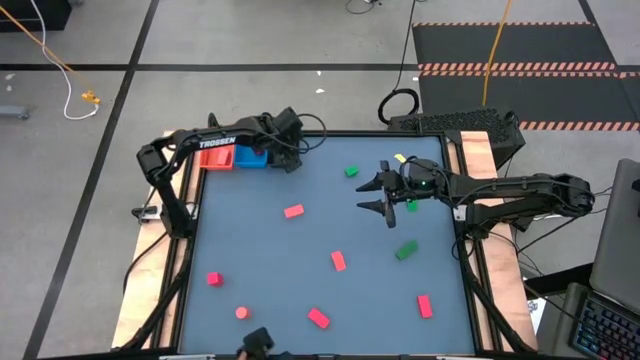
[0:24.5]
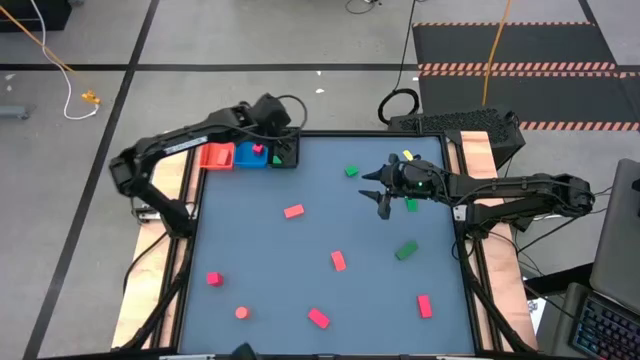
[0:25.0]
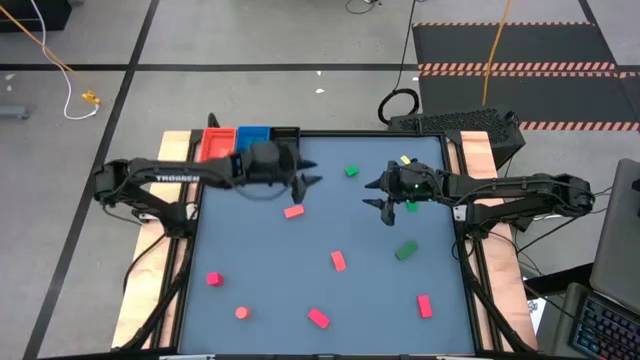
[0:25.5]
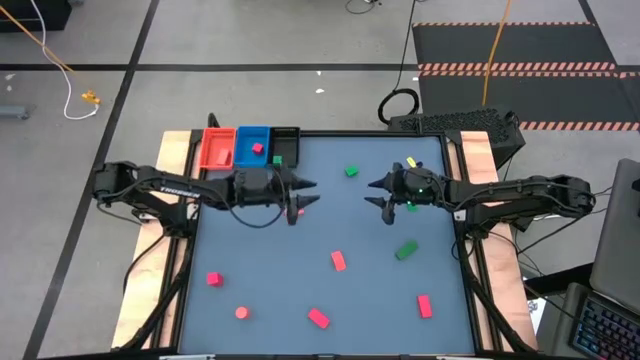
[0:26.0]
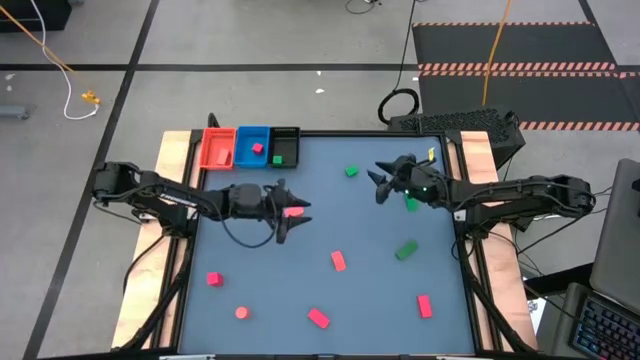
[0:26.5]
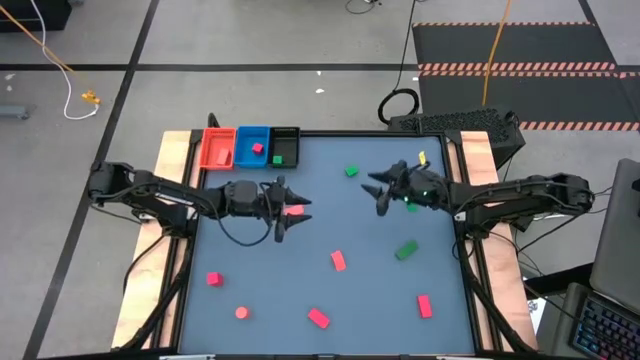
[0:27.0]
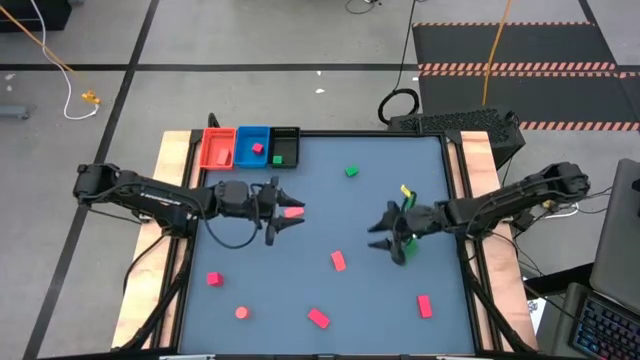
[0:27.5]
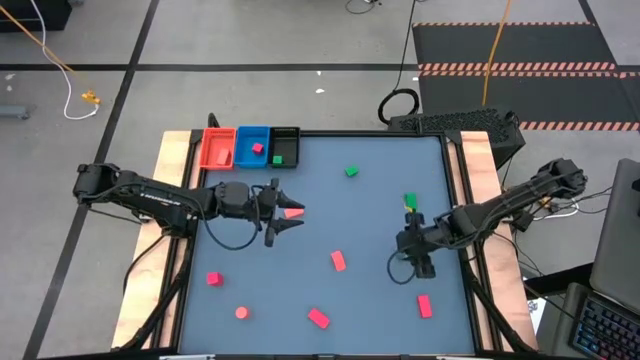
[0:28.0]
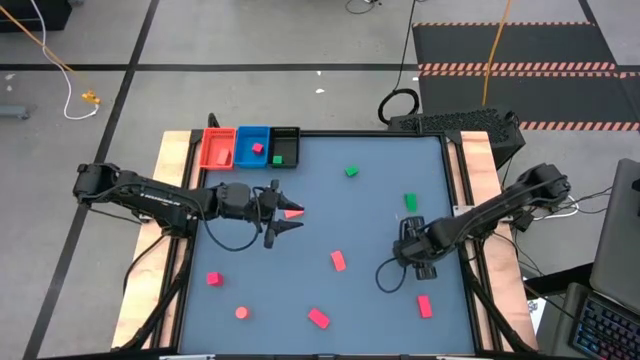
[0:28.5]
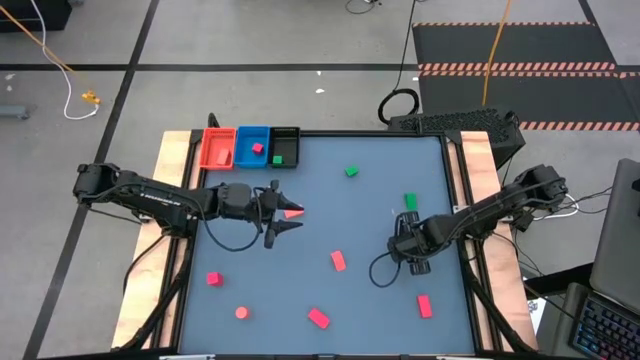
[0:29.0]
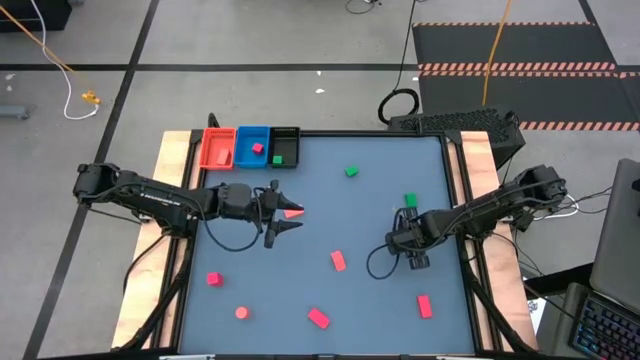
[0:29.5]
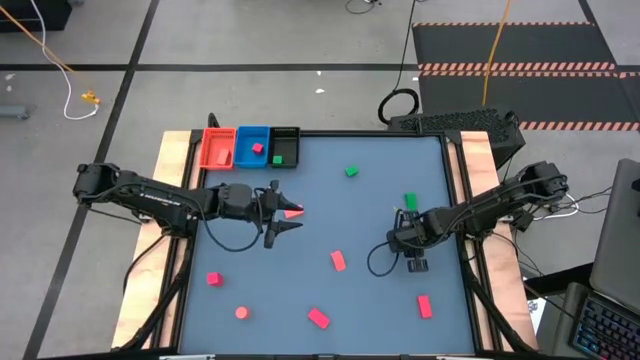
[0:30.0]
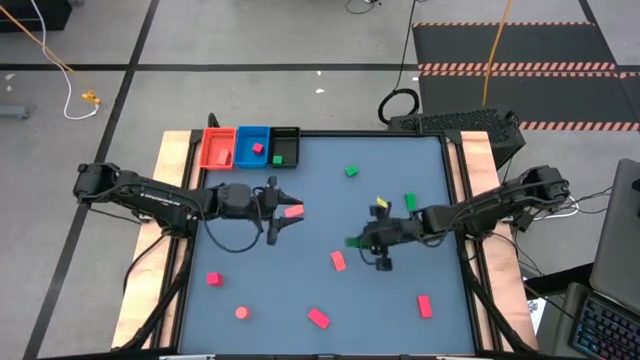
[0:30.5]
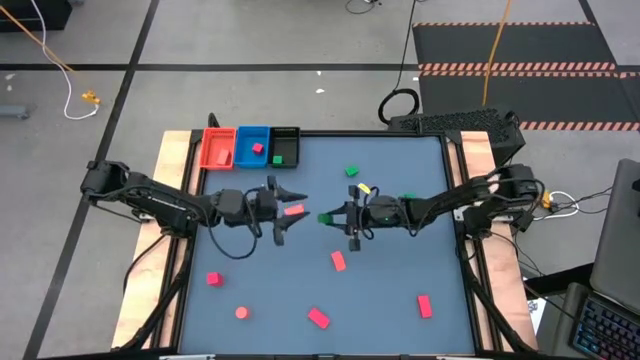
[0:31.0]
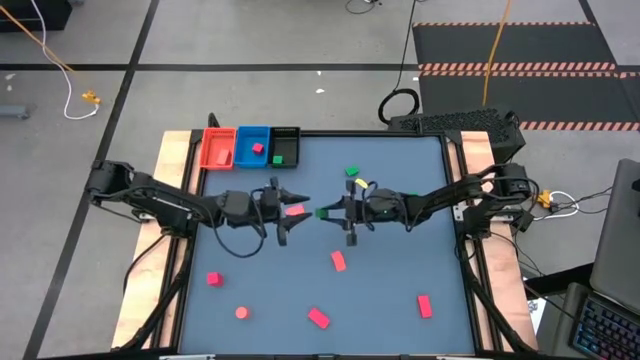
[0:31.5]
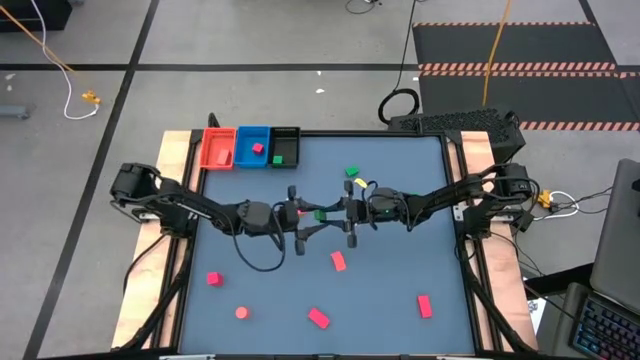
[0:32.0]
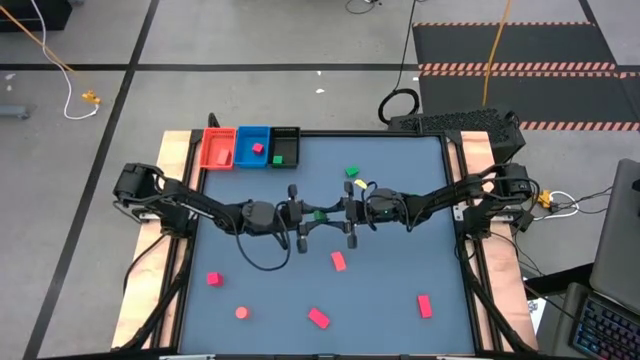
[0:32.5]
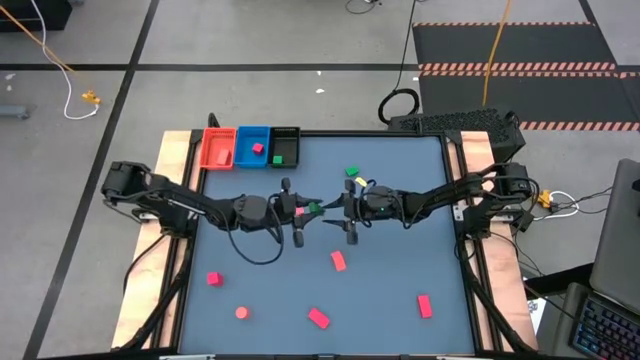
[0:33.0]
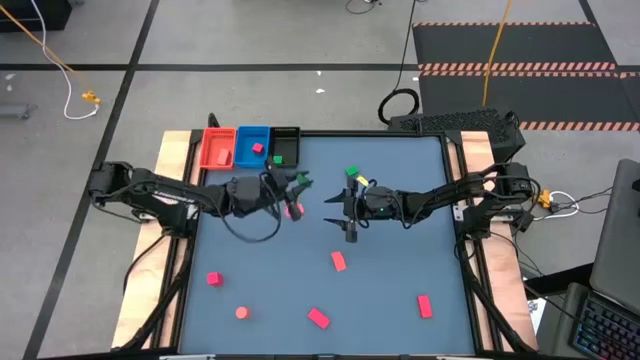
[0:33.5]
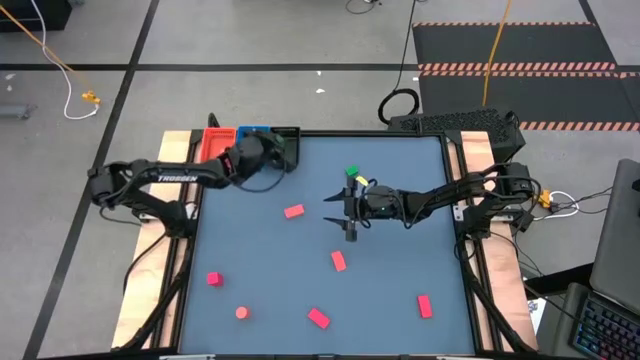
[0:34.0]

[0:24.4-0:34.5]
Task: Sort & place blocks by color
Put the green block into the black bin

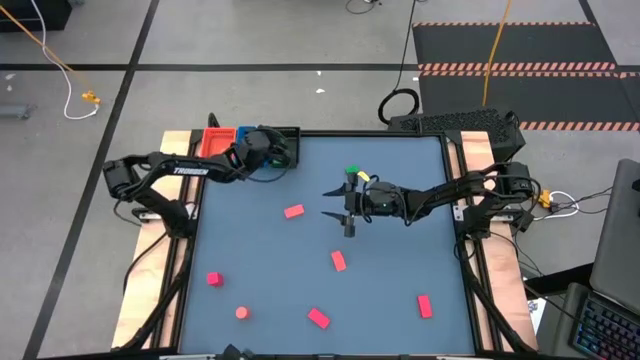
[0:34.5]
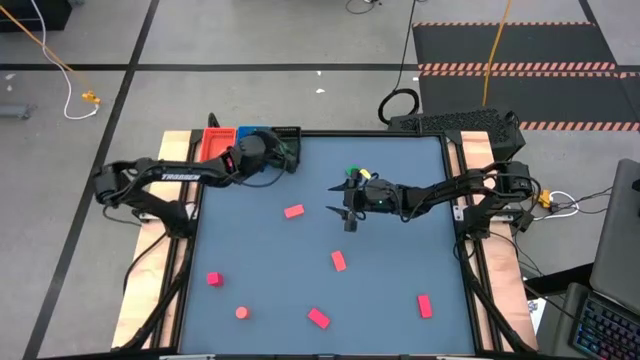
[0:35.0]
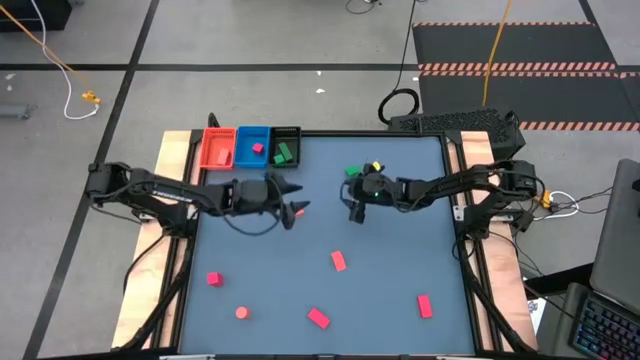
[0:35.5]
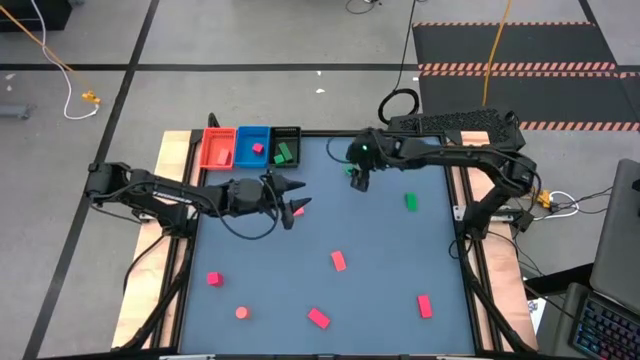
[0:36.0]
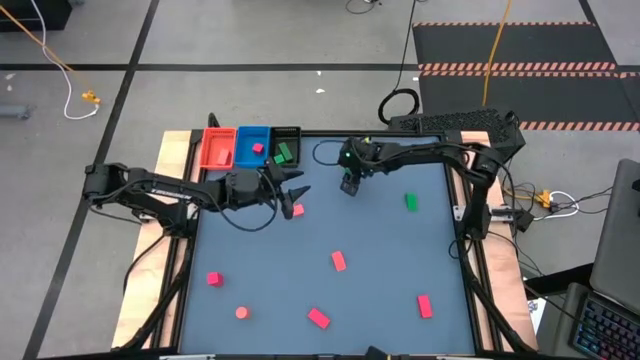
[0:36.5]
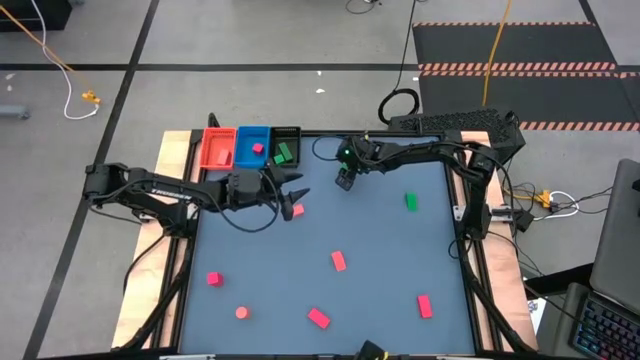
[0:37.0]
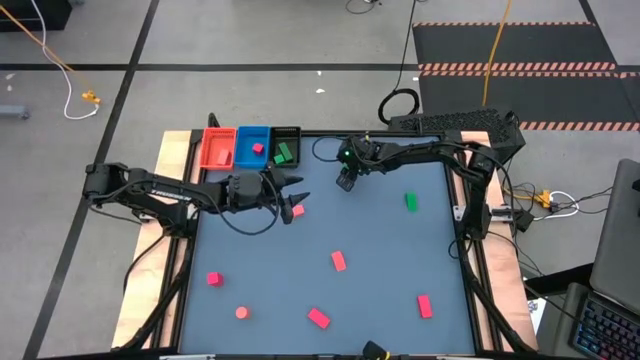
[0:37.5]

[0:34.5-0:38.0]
Put the green block into the black bin

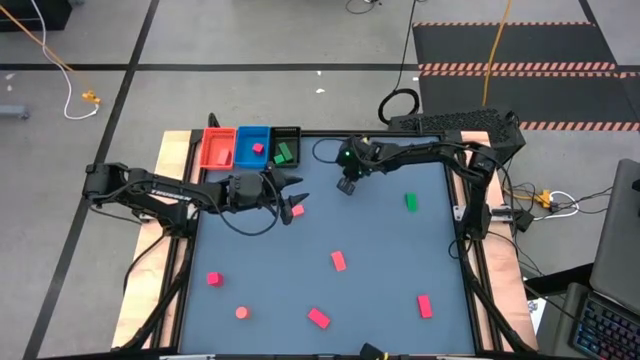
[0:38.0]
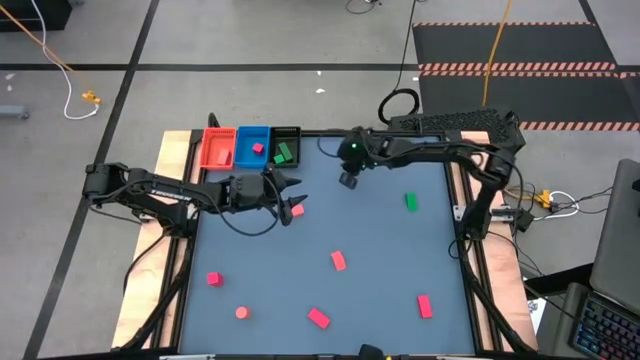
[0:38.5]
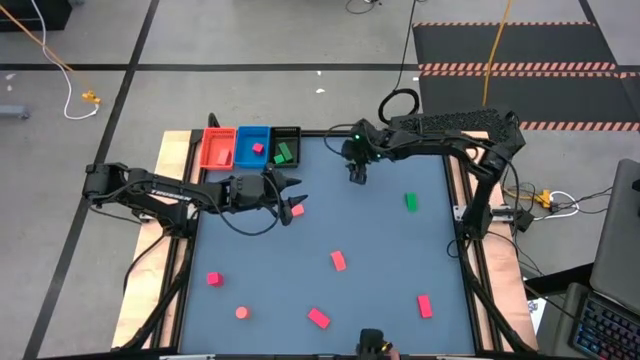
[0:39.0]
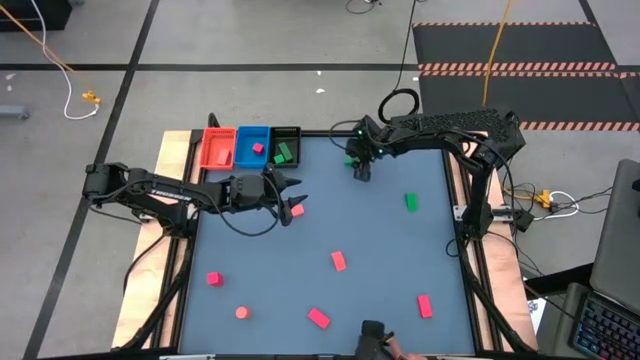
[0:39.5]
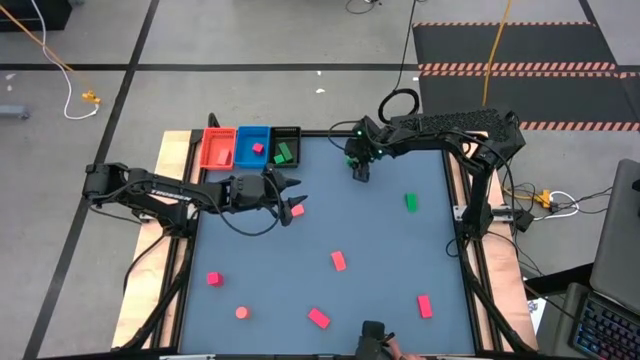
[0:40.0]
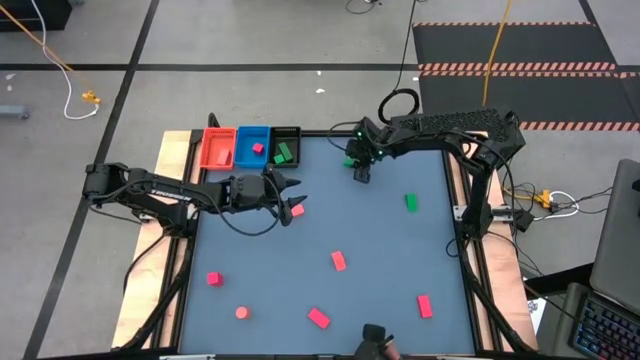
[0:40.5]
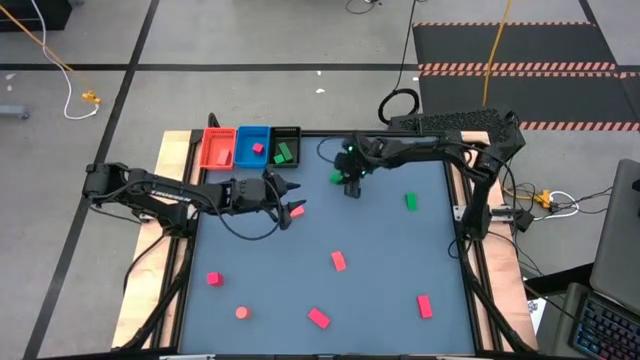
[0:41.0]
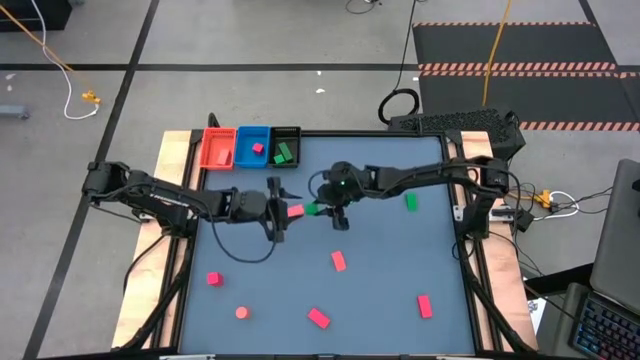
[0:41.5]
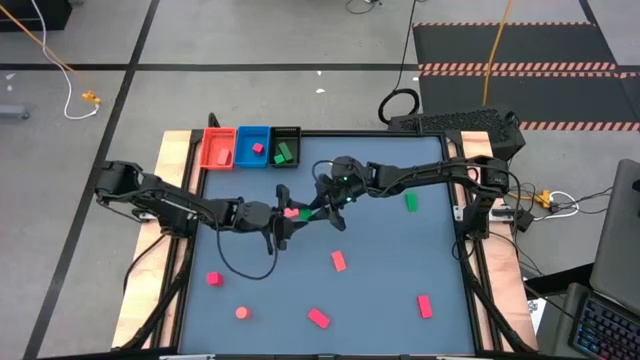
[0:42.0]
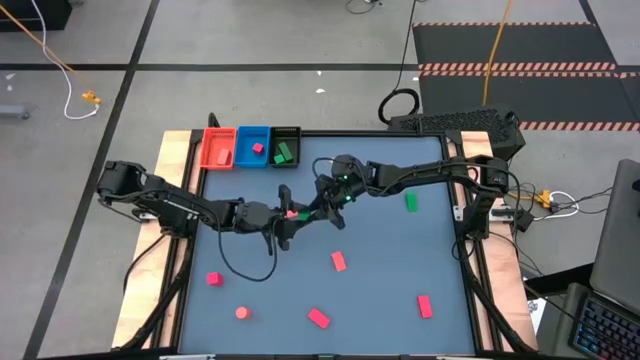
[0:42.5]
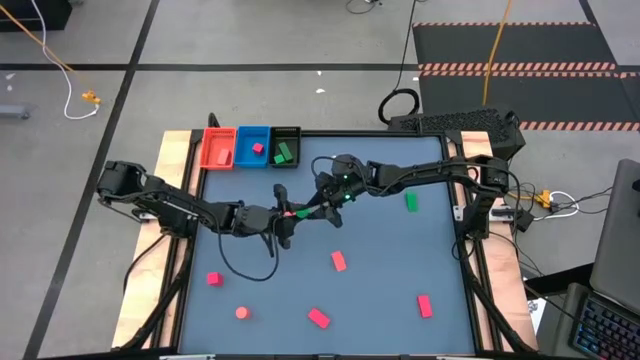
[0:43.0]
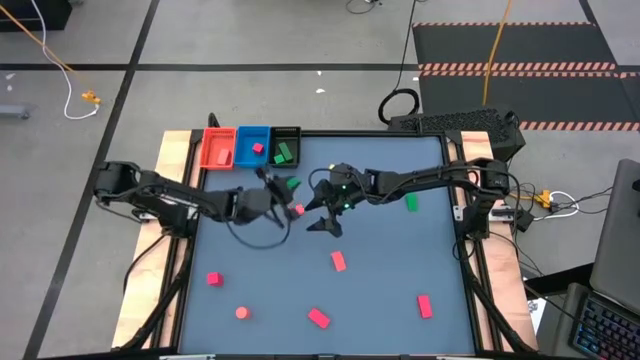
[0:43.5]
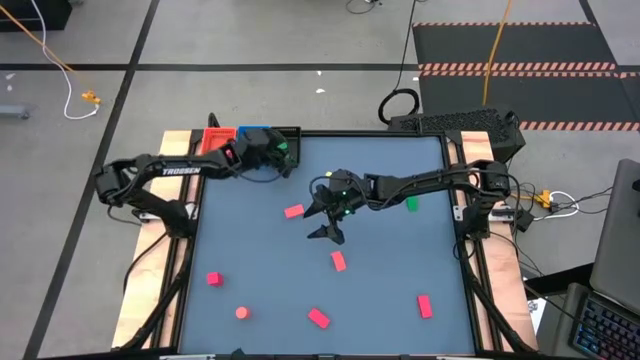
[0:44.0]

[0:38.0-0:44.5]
Put the green block into the black bin
